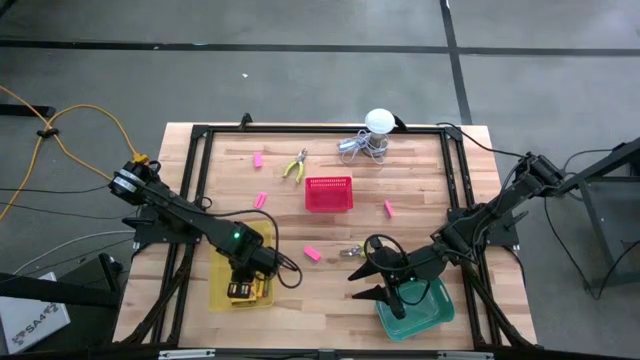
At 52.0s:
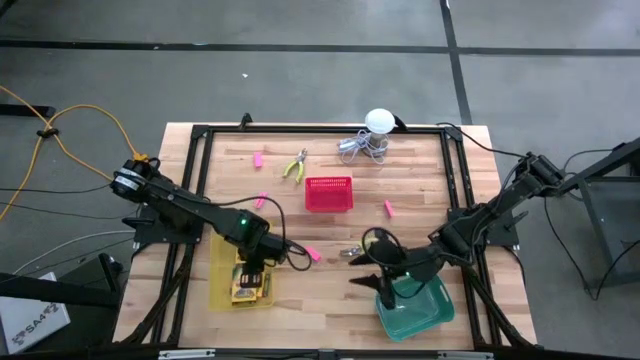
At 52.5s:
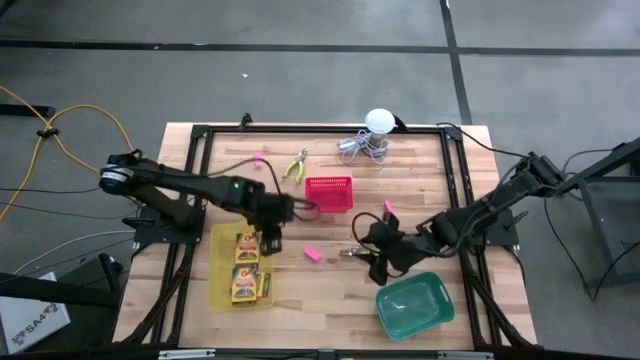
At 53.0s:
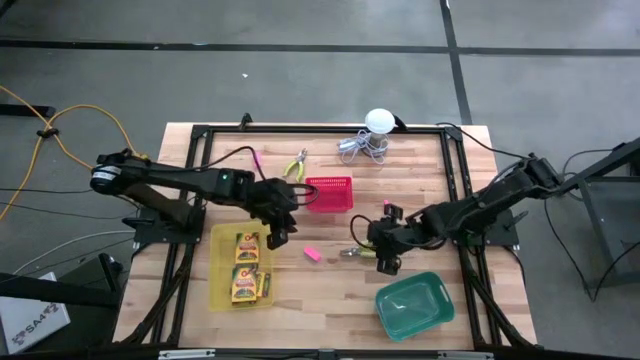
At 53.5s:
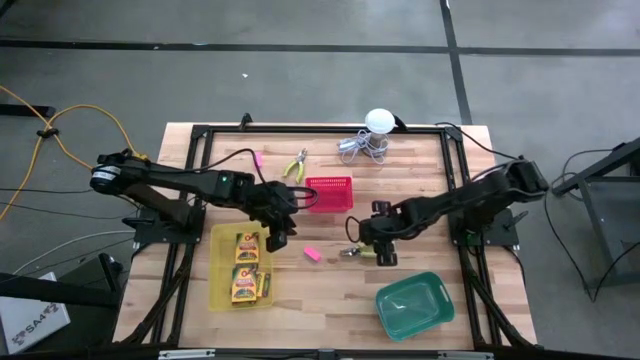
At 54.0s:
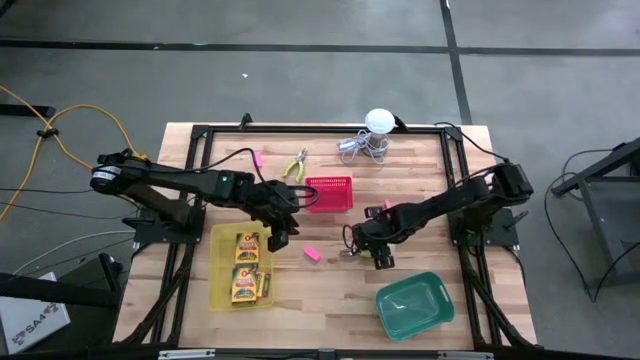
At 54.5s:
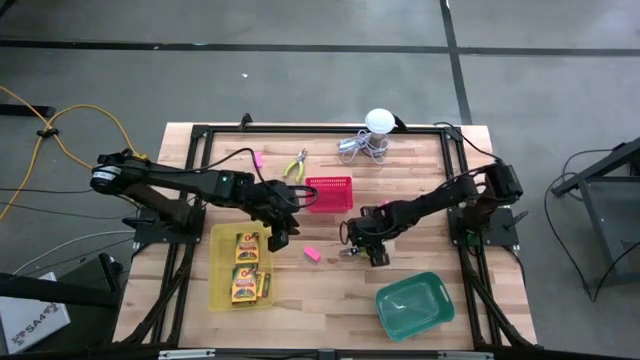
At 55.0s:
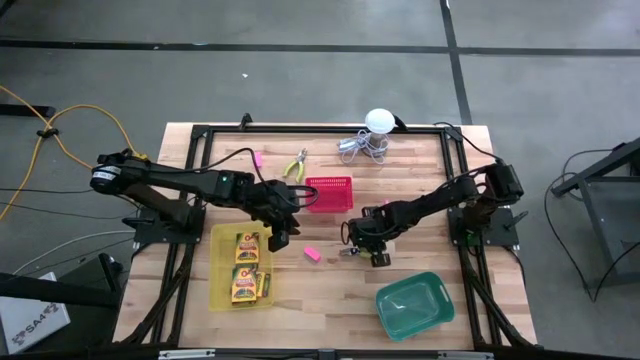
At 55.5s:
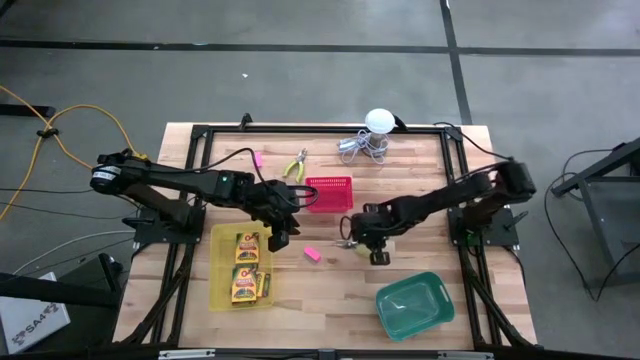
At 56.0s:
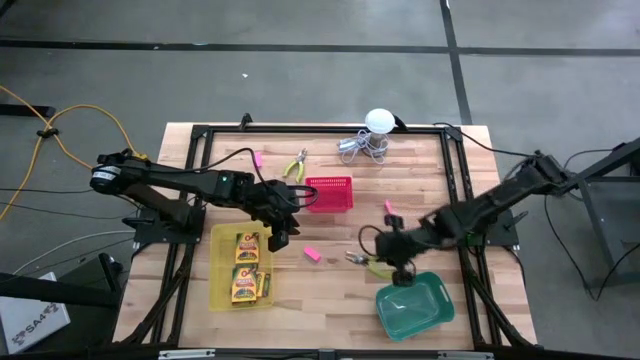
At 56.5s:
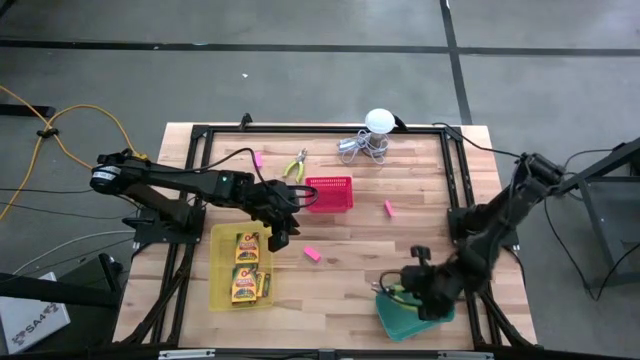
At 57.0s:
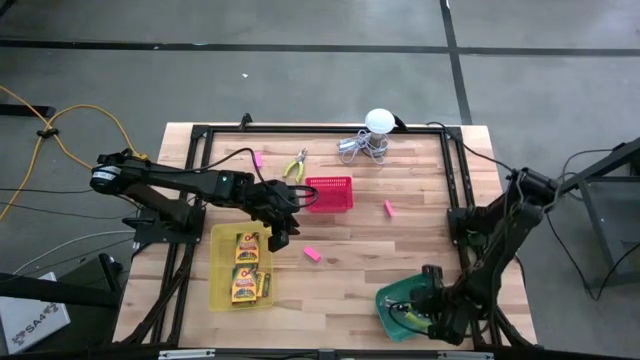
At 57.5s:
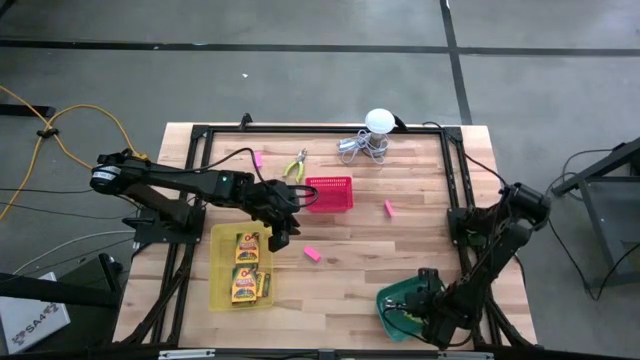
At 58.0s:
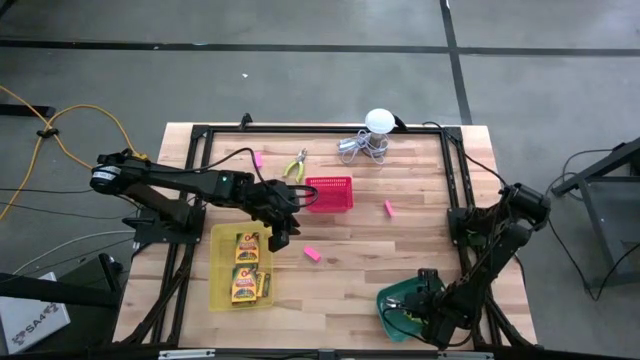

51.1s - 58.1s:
Task: Pick & Place School Supplies
Put the green paper puncher into the blue bin

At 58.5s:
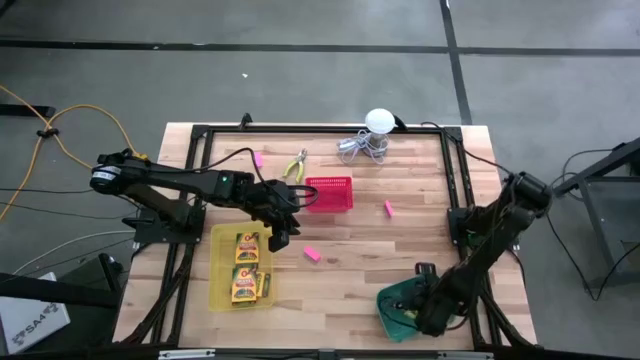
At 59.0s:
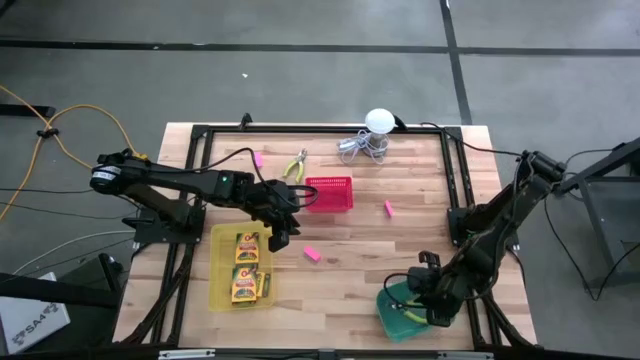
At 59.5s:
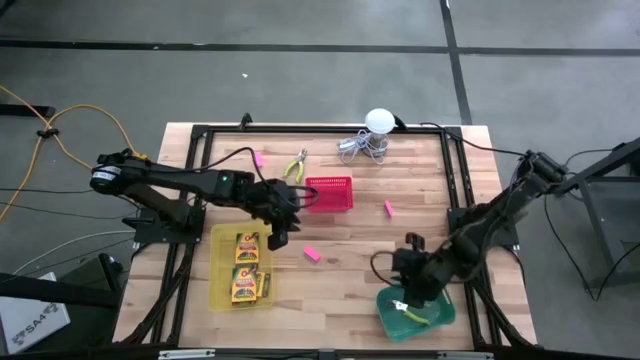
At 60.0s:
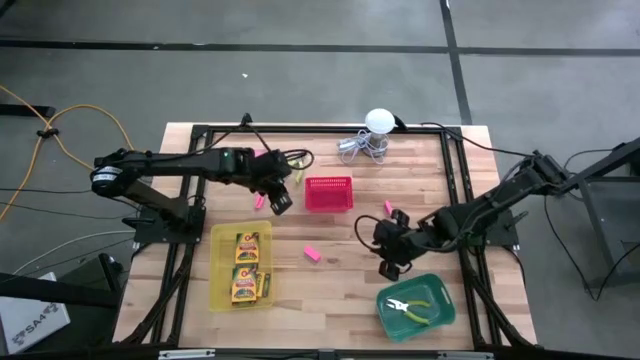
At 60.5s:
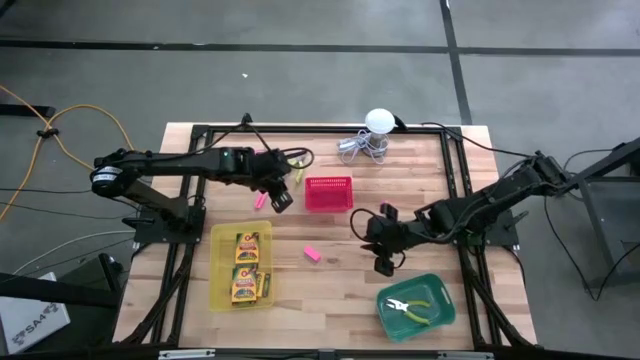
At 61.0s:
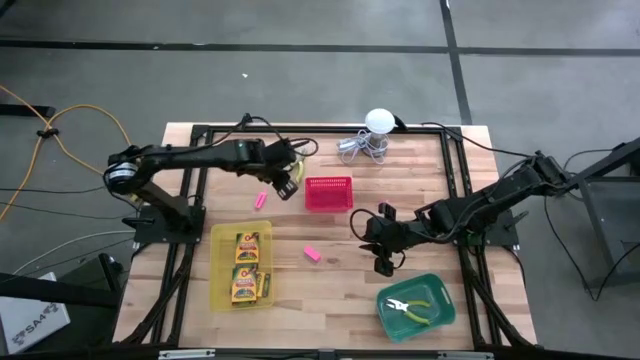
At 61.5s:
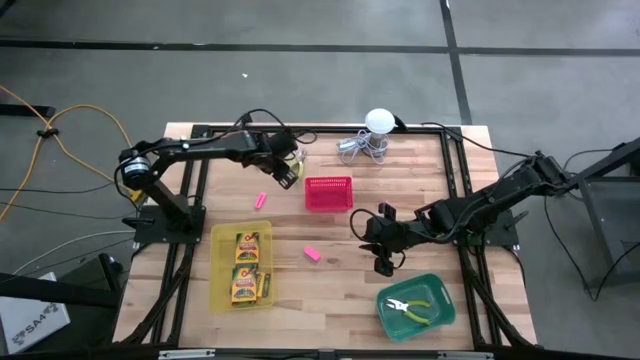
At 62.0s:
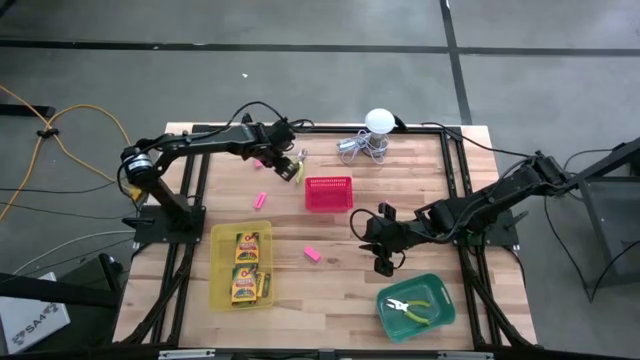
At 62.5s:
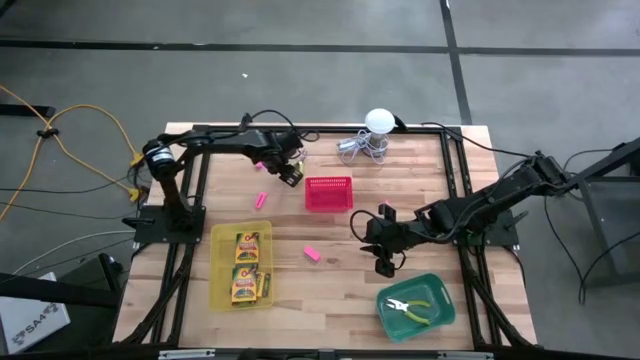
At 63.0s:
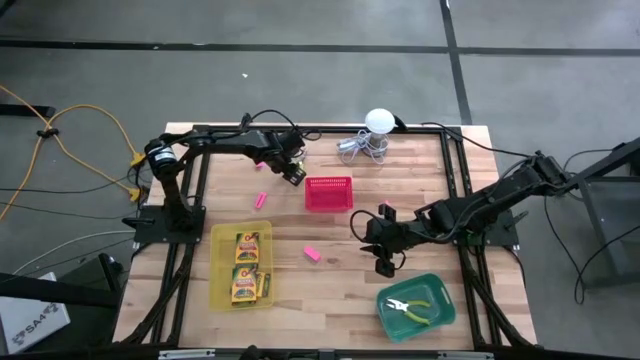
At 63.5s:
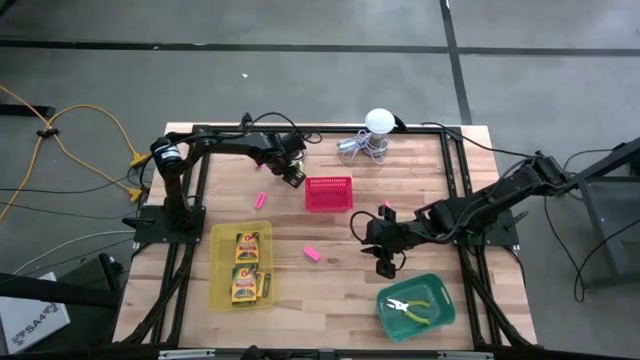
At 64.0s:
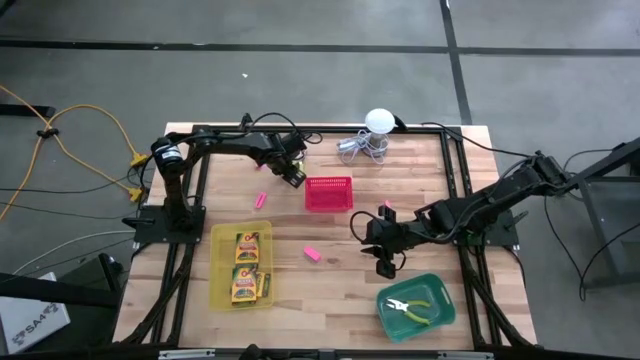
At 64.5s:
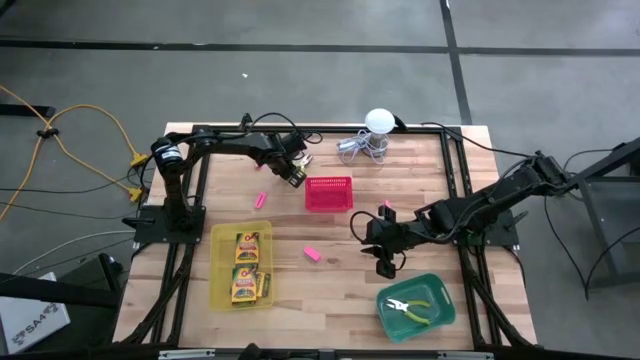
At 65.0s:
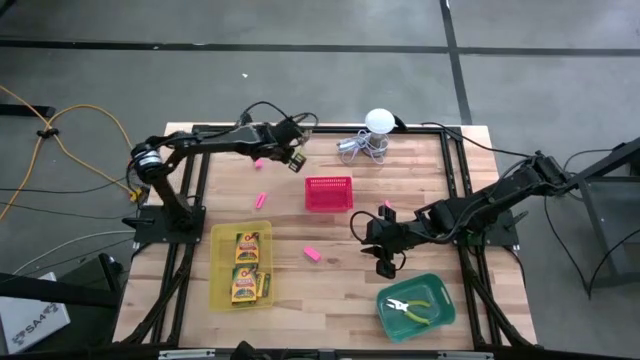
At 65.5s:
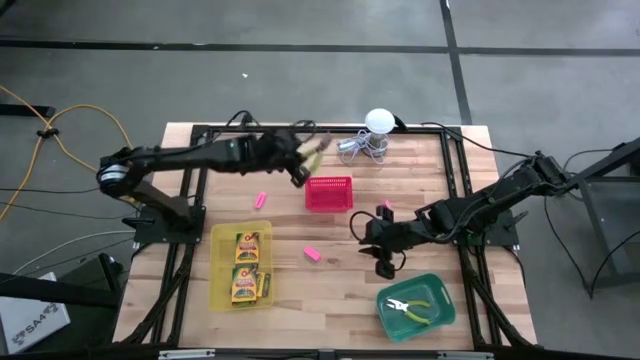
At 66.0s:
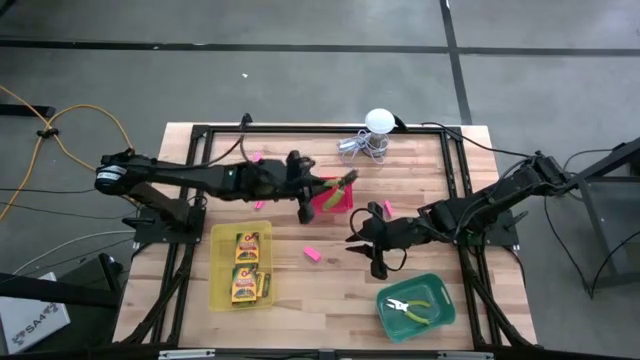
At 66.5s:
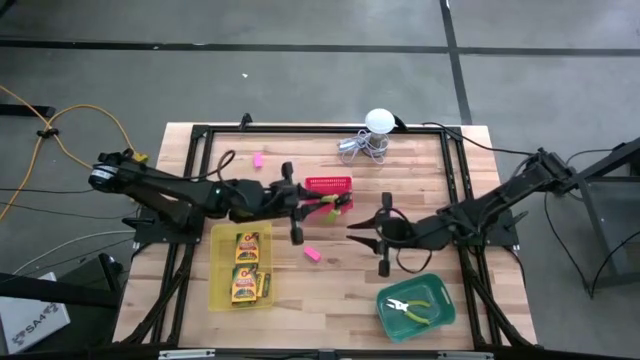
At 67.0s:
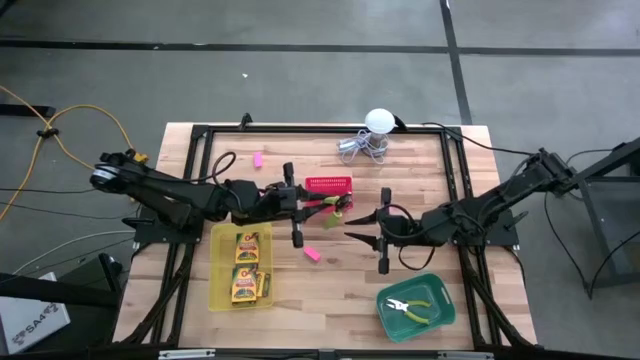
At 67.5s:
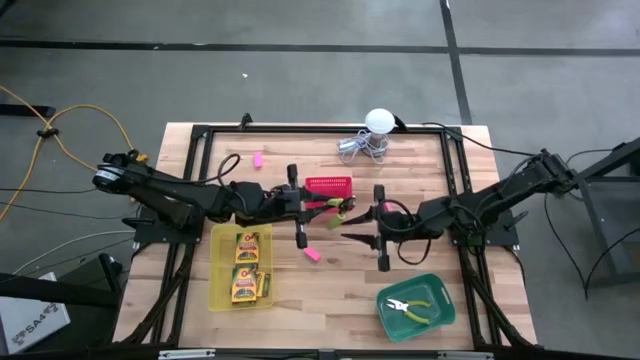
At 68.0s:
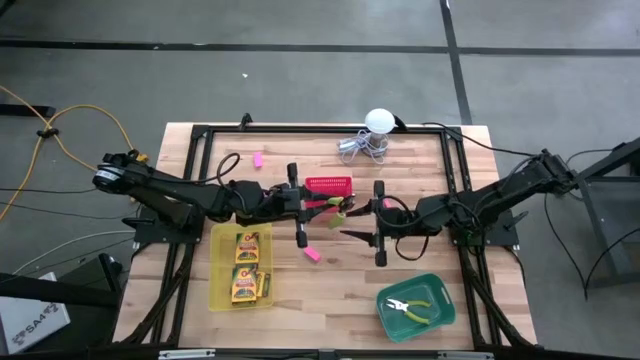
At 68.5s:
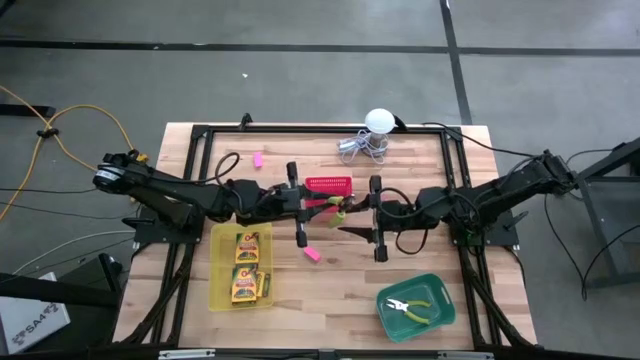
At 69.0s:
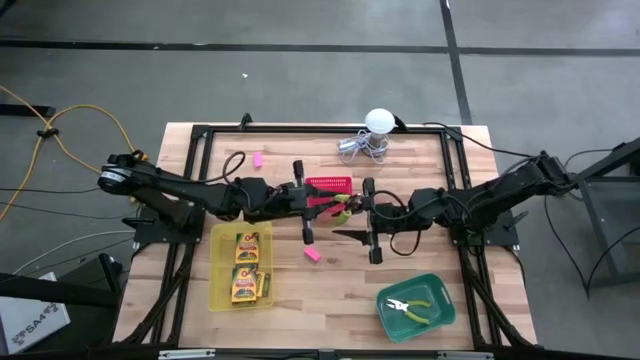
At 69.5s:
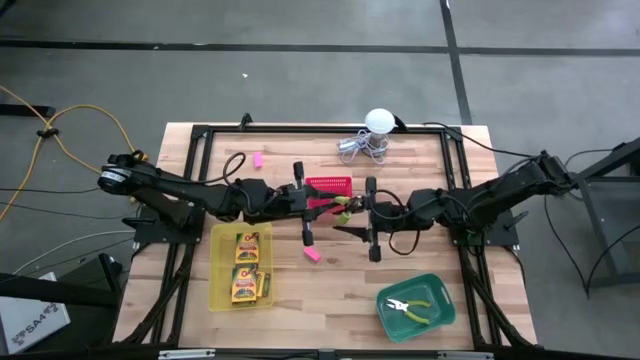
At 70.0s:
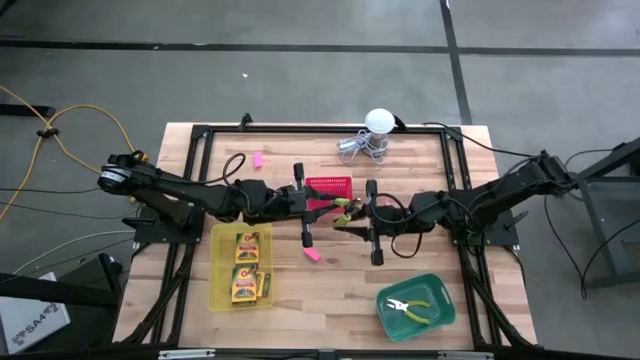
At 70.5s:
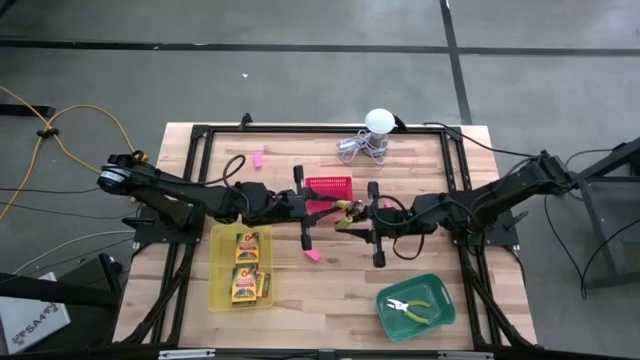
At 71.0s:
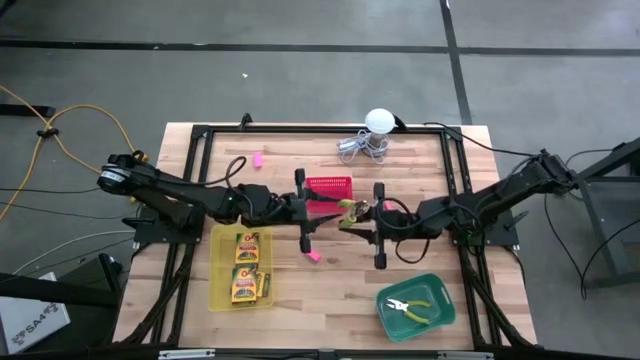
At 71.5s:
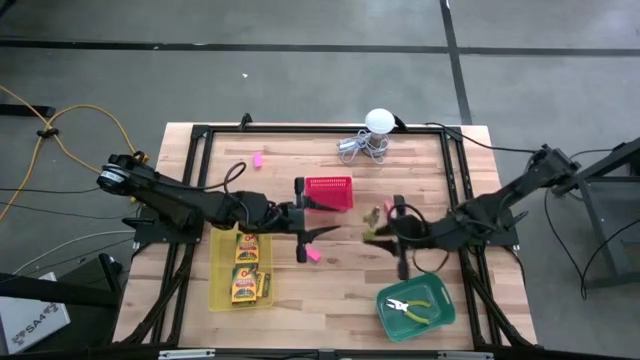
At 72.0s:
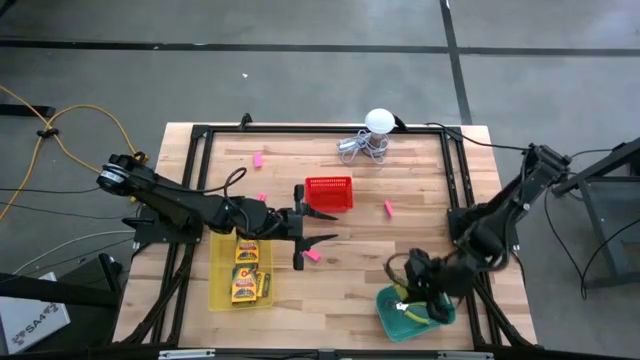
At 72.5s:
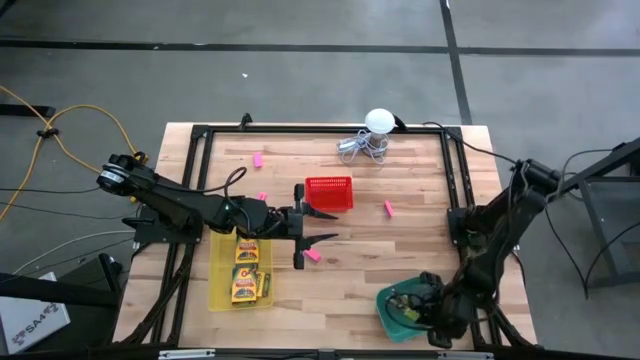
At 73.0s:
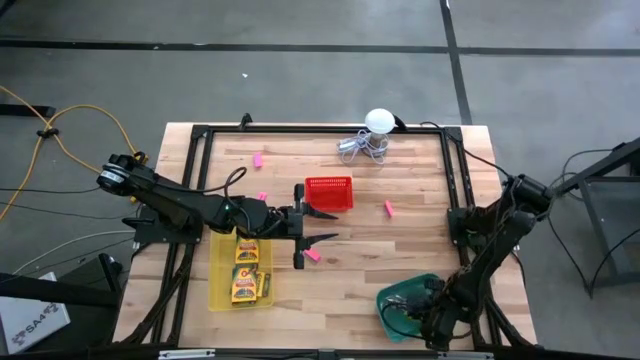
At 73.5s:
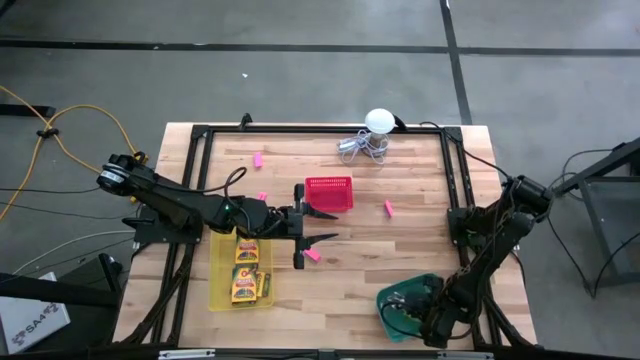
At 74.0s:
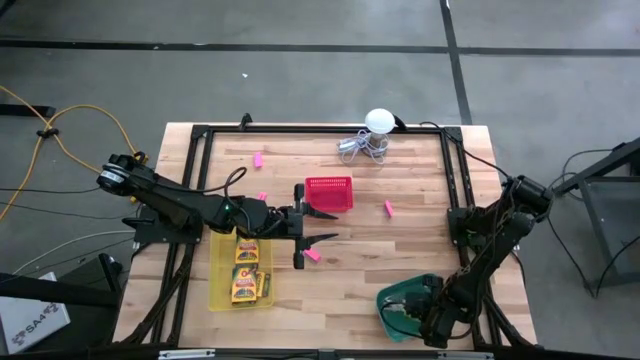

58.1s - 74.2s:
Put the green paper puncher into the blue bin
